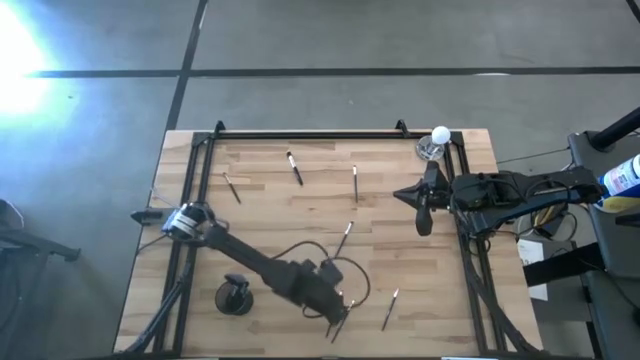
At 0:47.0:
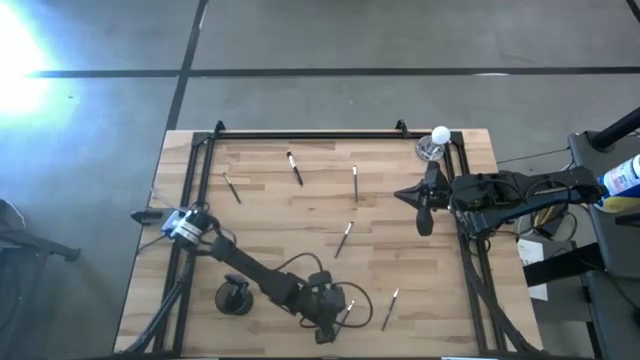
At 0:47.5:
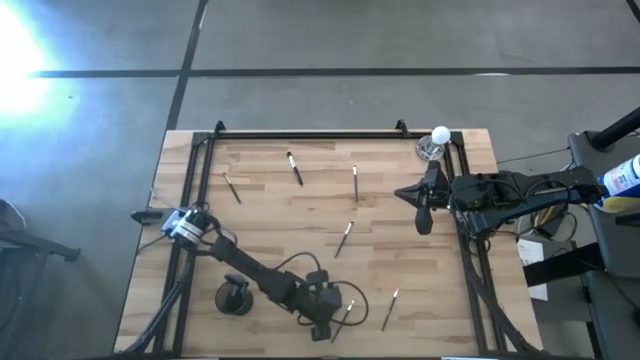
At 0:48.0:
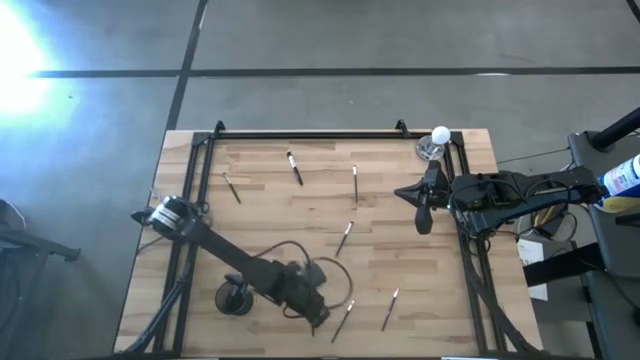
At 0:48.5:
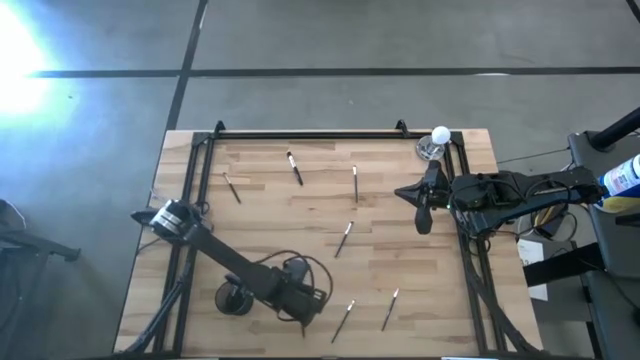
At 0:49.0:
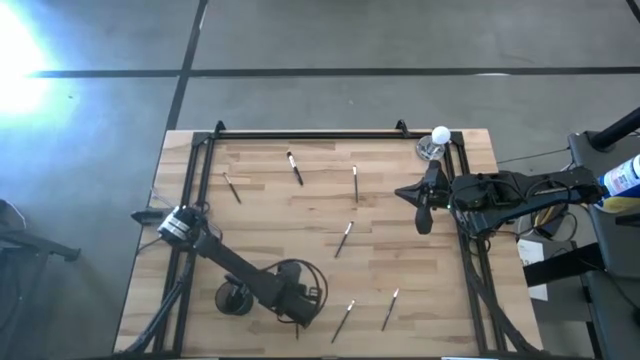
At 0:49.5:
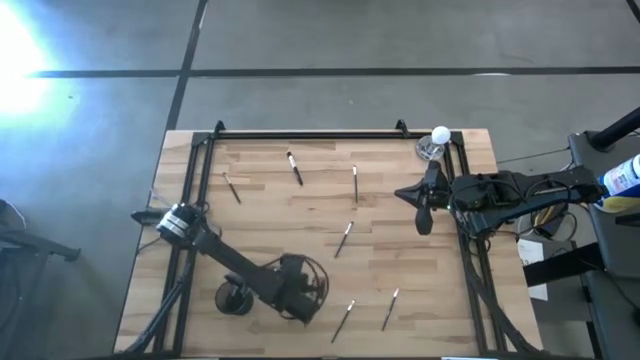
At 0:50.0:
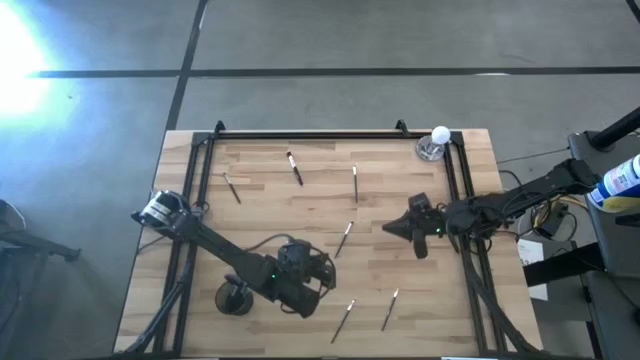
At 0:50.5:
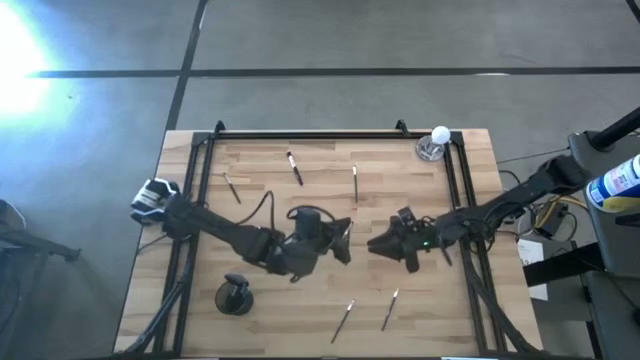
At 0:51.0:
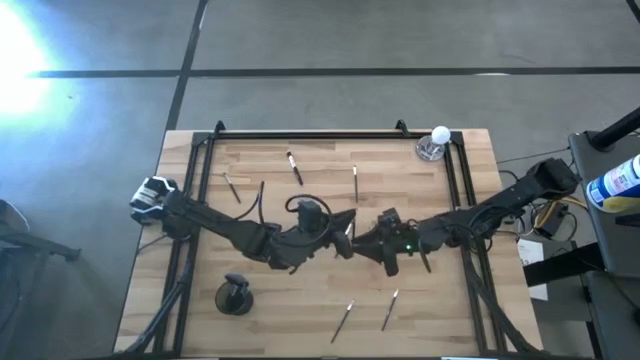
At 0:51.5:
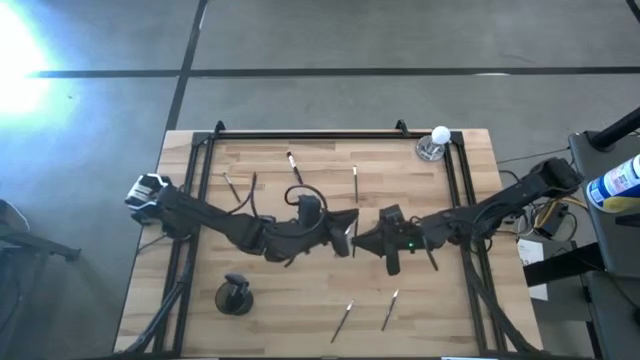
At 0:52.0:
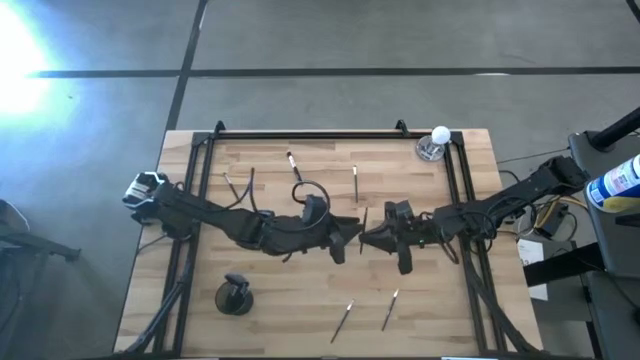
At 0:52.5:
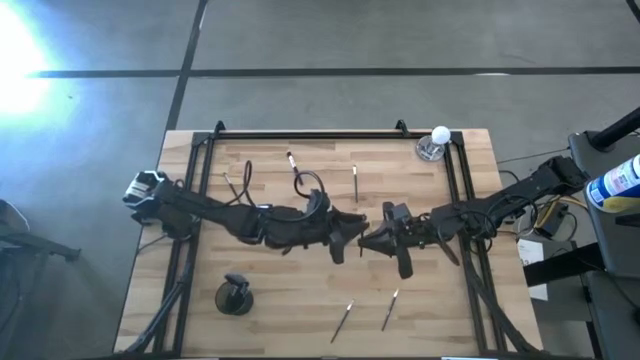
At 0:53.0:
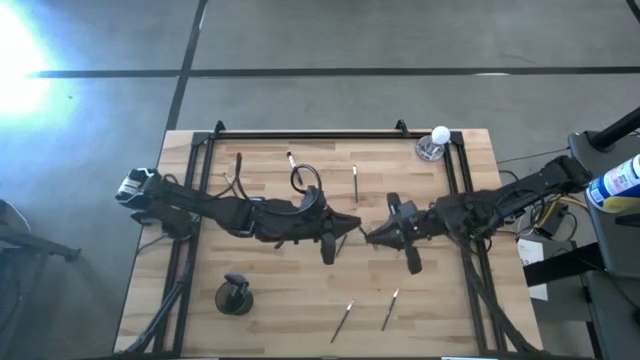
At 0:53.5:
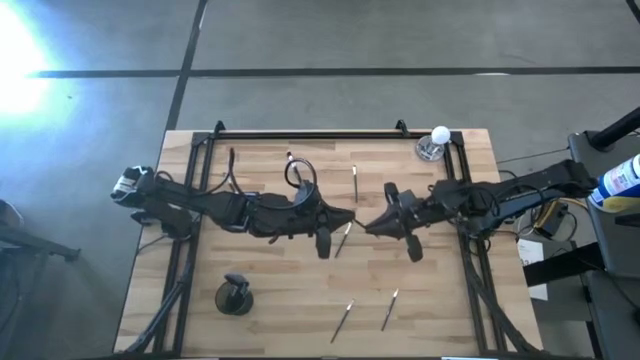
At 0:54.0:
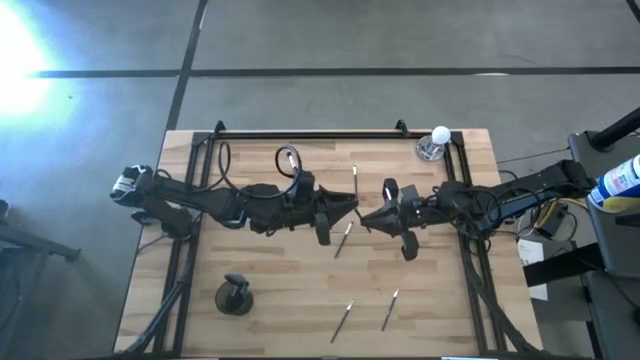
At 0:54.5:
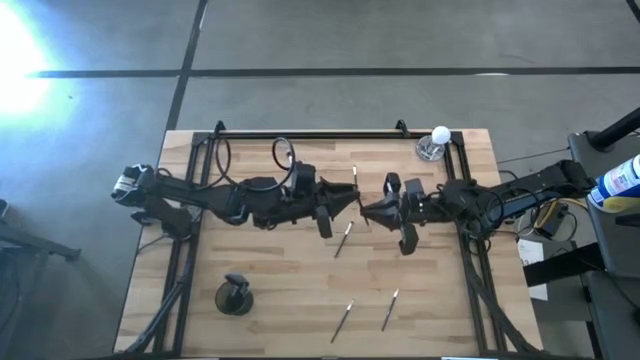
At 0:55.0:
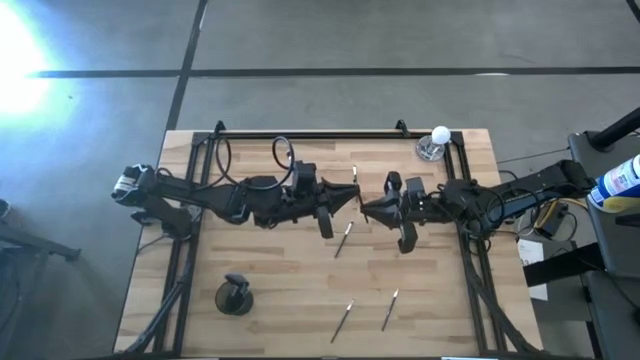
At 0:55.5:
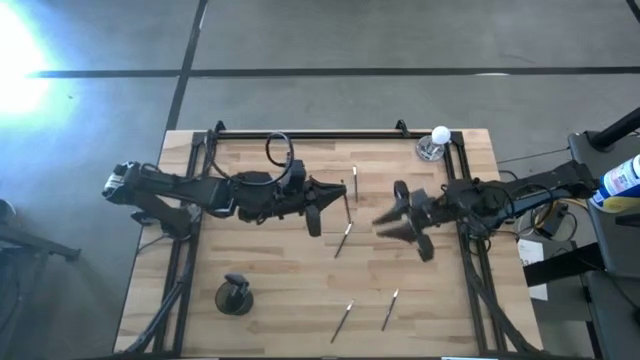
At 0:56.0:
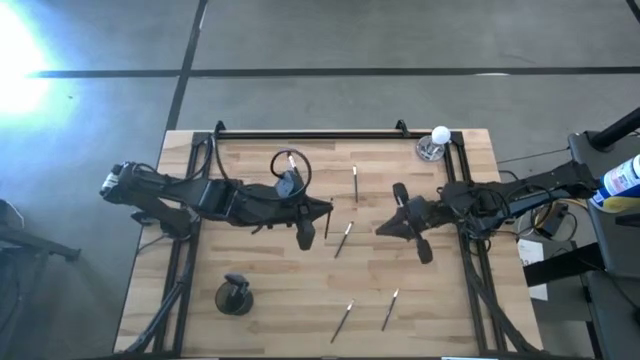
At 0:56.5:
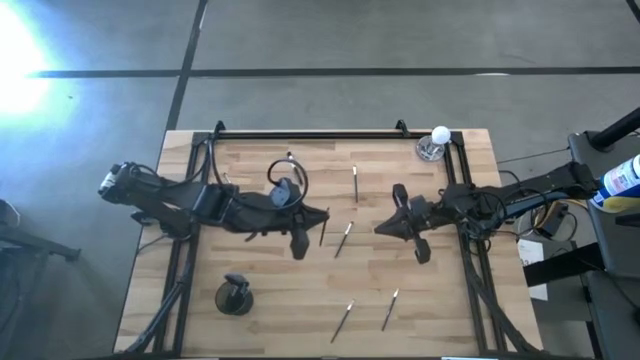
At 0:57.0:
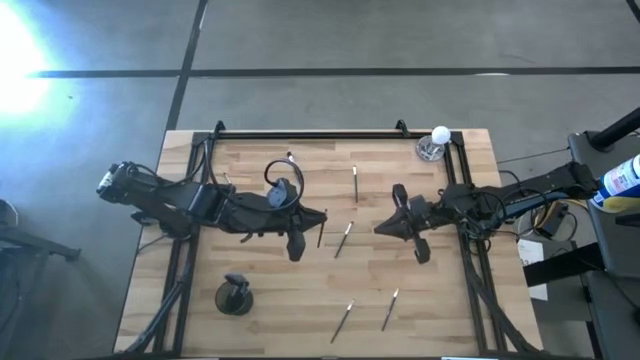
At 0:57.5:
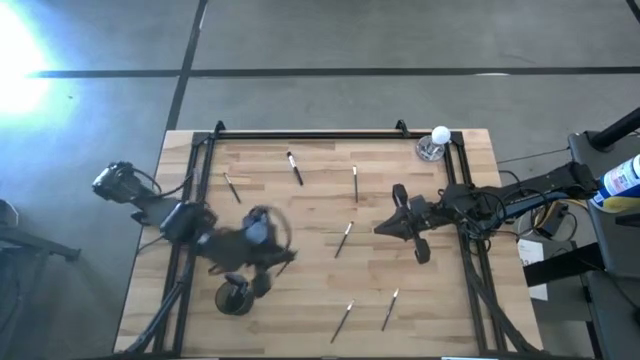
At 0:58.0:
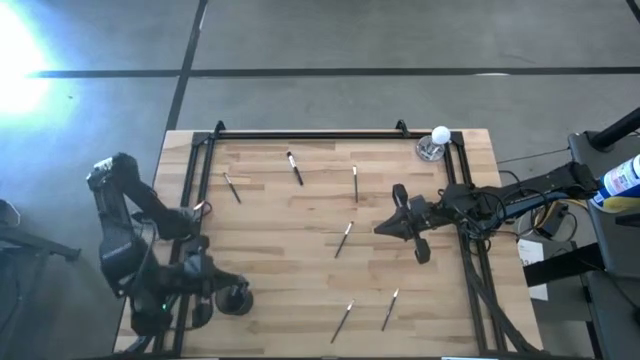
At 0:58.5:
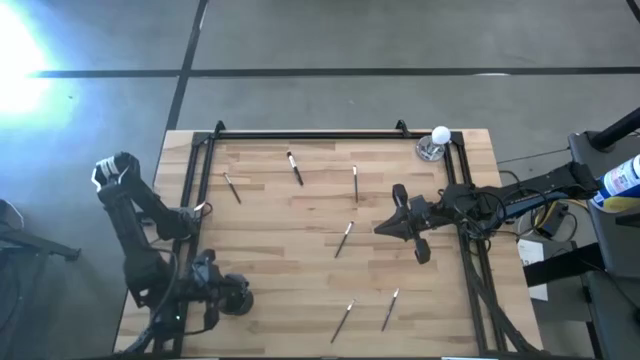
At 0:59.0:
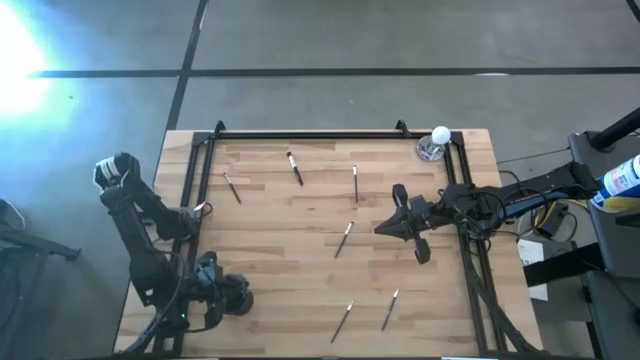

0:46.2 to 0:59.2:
Task: Pick & Place Makeup Brushes
Put the eyeshadow brush into the holder

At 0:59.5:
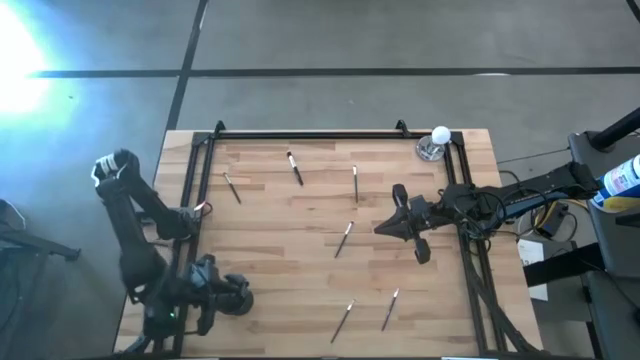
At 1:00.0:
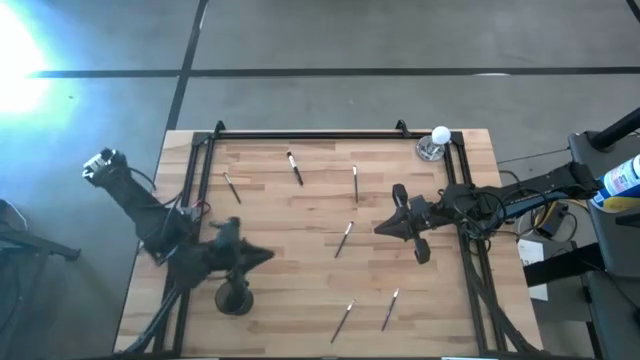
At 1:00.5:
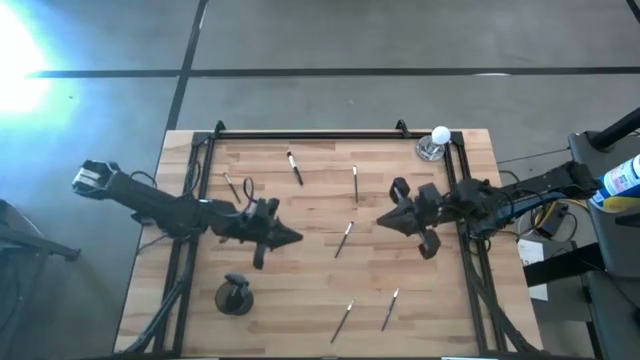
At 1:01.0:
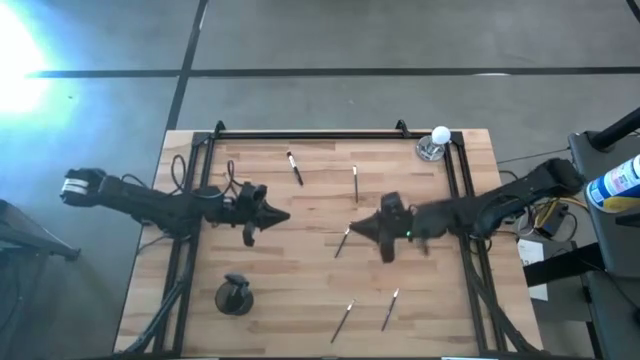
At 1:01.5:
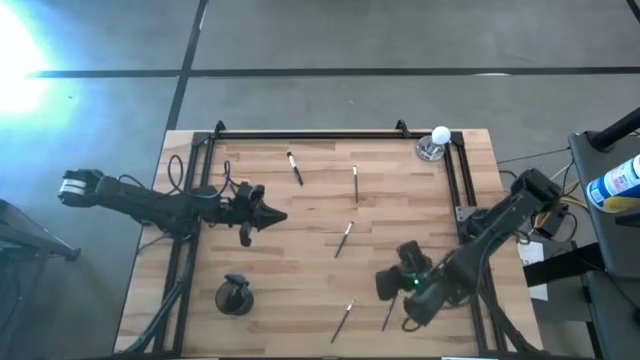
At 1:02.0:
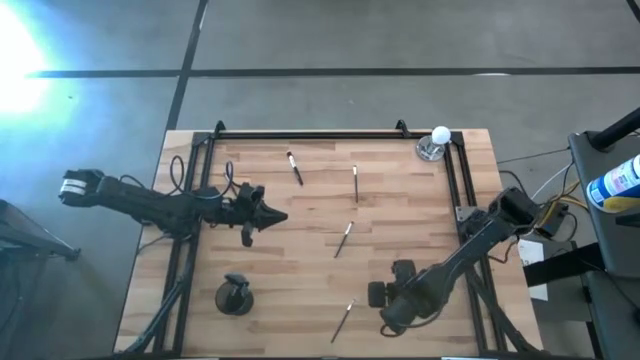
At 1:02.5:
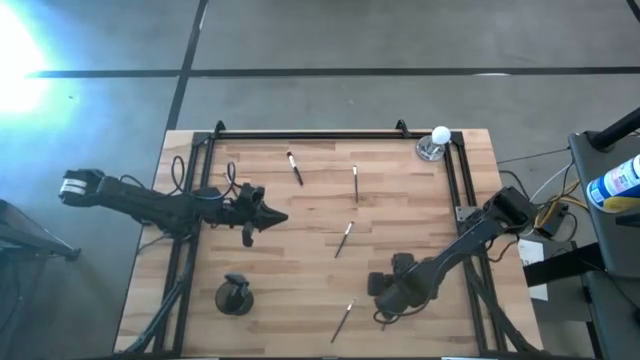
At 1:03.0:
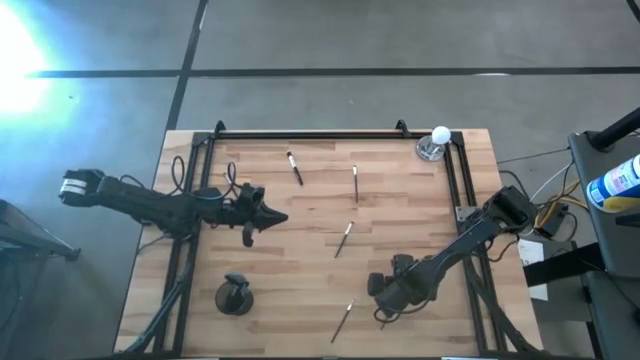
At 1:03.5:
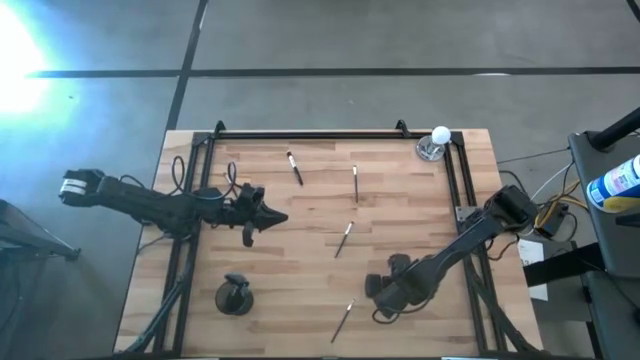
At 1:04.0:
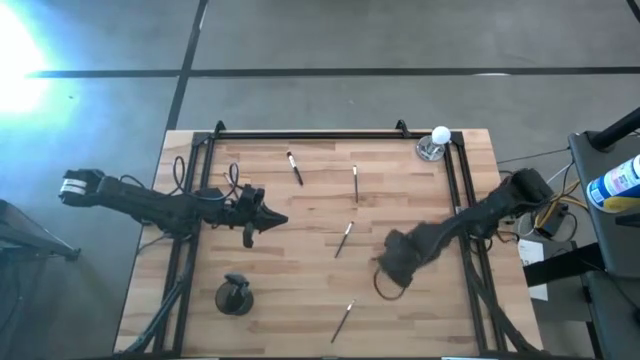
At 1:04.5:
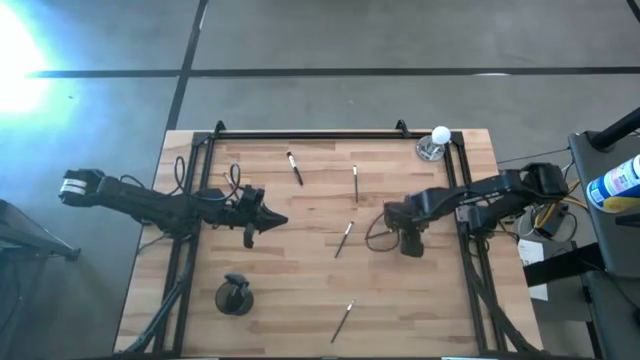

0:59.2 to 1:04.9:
Put the liner brush into the holder

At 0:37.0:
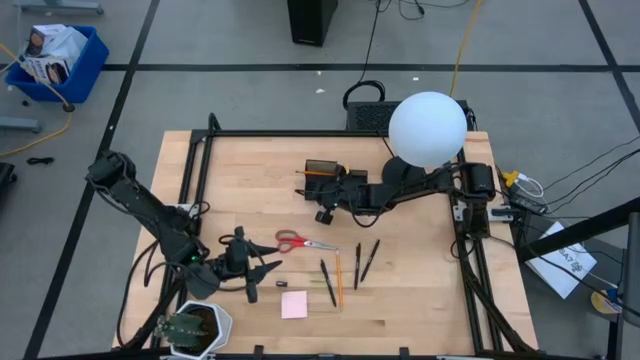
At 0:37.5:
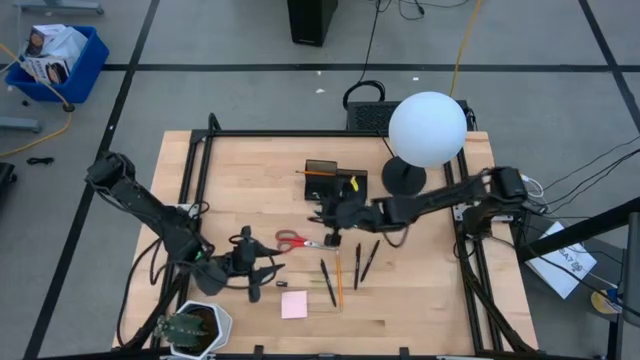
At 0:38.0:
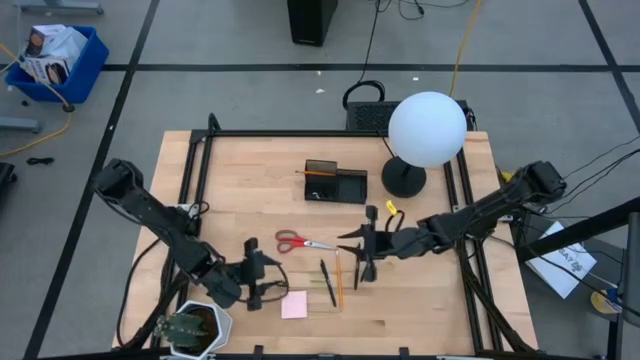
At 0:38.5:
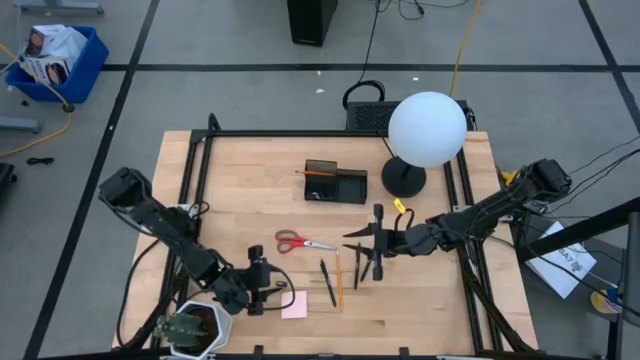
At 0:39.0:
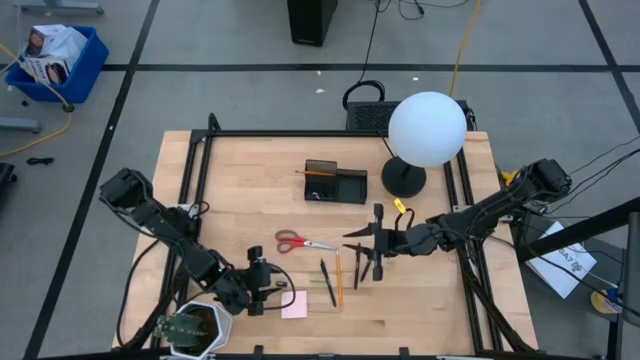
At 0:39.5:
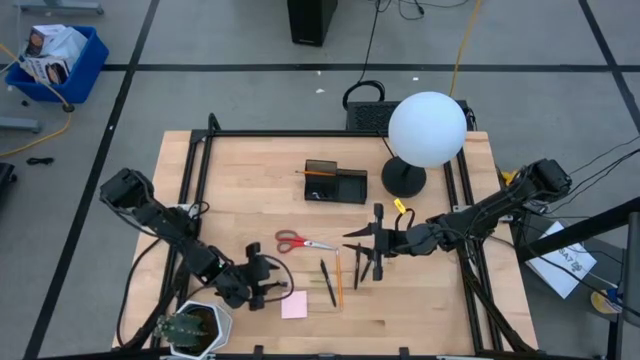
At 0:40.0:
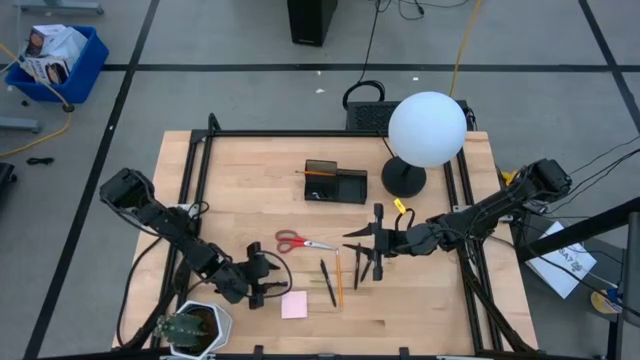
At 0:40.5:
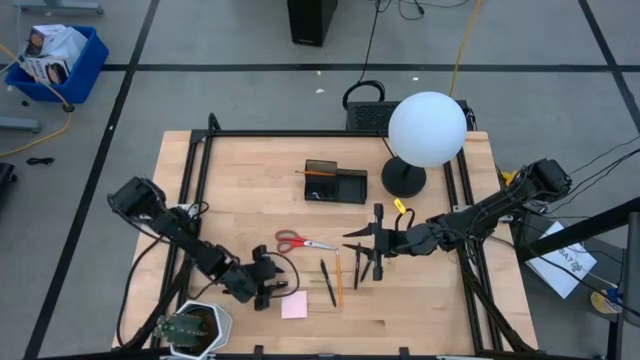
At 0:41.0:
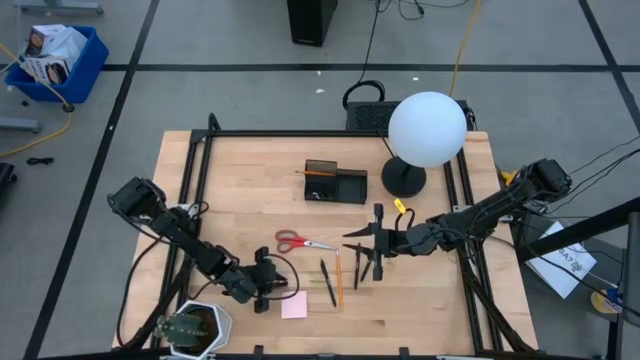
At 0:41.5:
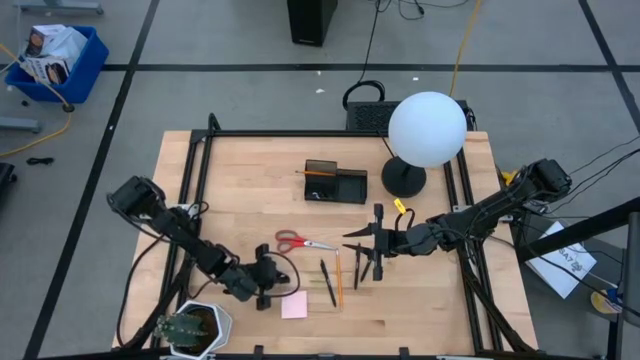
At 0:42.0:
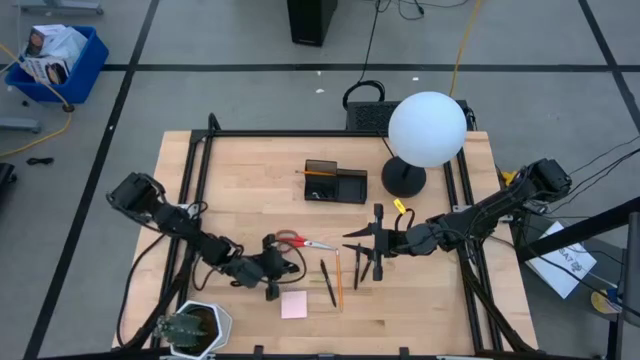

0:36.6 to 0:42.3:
Task: Pick and place office supplies into organizer
Put the black binder clip into the black desk organizer
